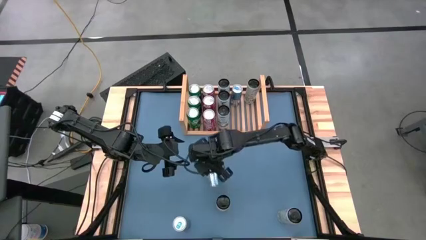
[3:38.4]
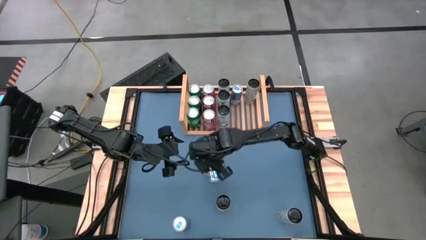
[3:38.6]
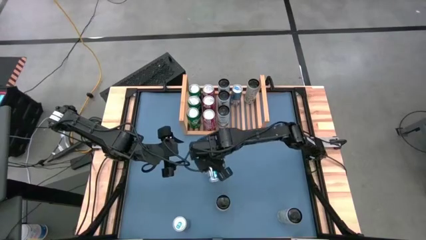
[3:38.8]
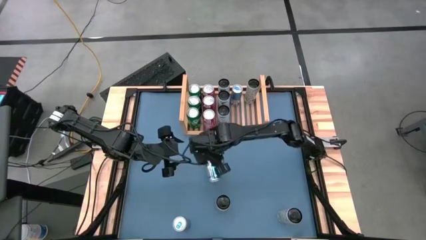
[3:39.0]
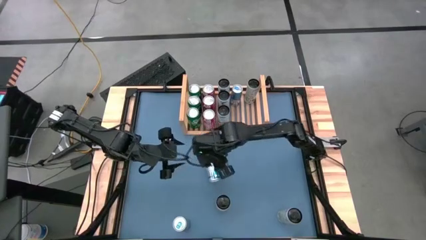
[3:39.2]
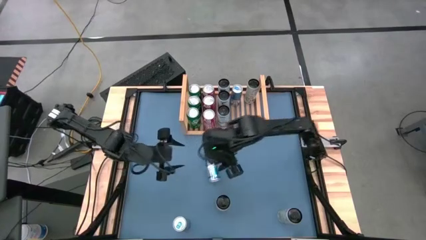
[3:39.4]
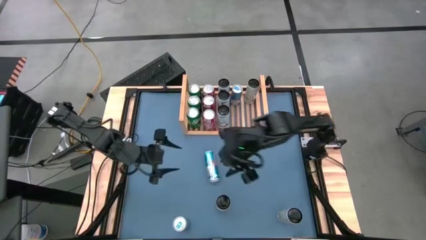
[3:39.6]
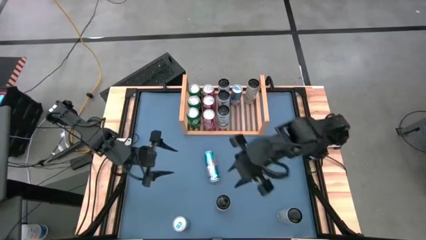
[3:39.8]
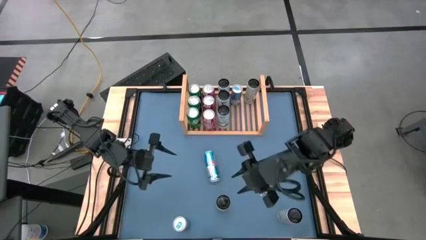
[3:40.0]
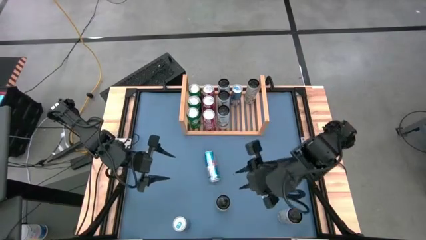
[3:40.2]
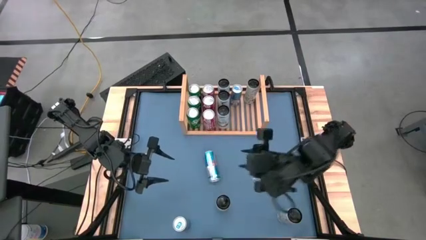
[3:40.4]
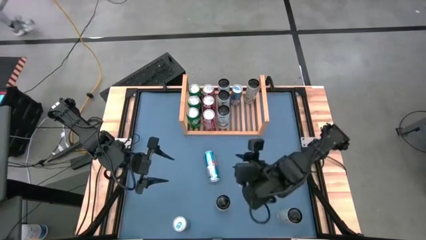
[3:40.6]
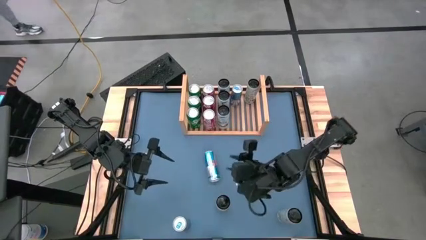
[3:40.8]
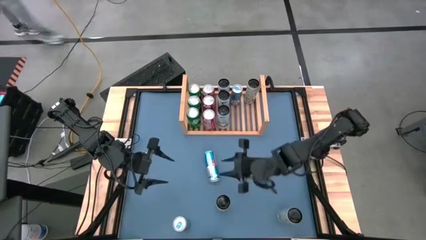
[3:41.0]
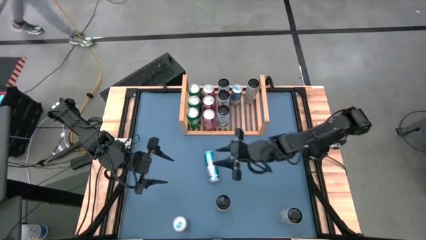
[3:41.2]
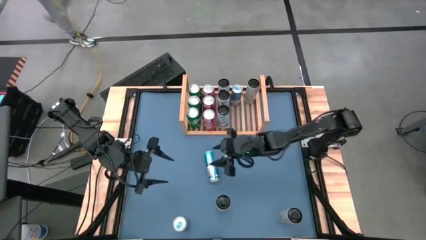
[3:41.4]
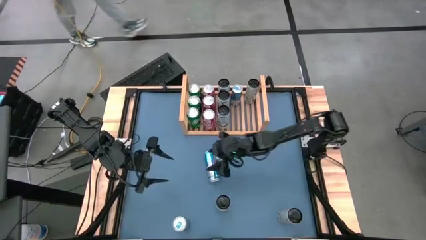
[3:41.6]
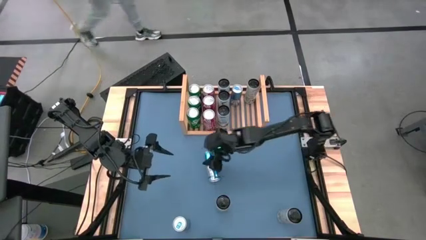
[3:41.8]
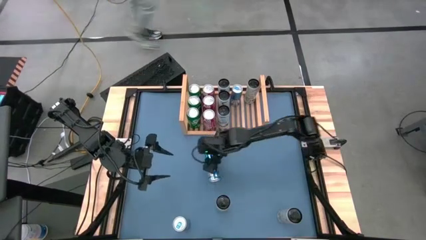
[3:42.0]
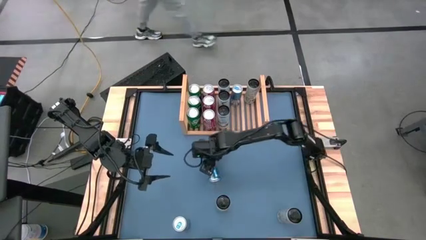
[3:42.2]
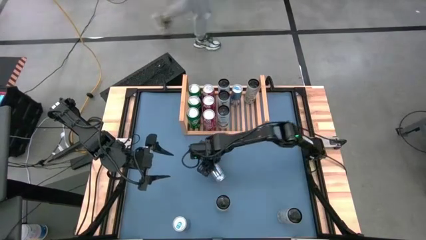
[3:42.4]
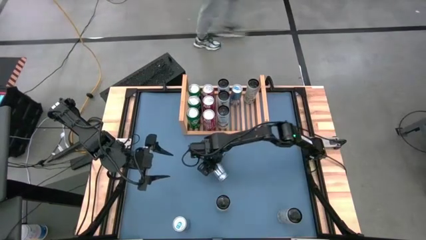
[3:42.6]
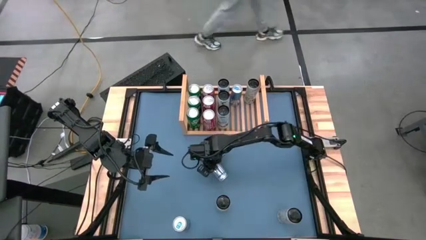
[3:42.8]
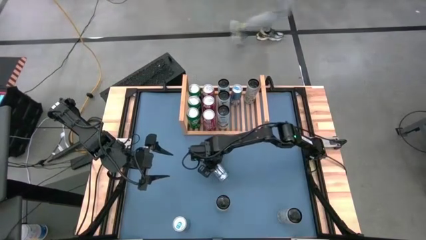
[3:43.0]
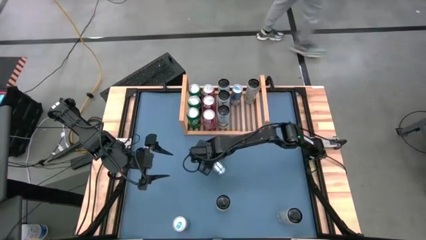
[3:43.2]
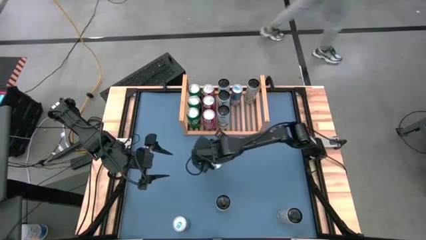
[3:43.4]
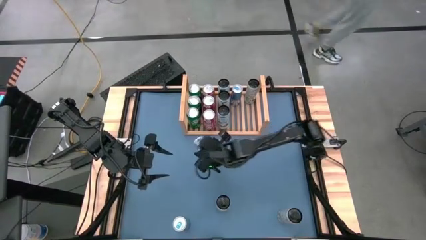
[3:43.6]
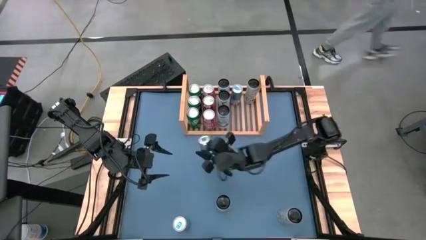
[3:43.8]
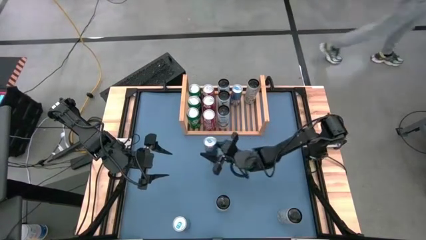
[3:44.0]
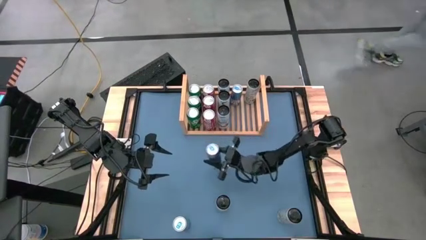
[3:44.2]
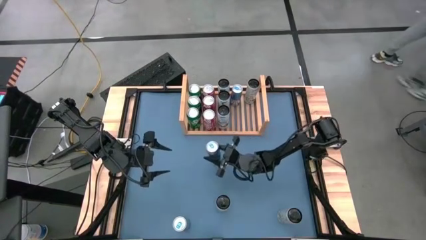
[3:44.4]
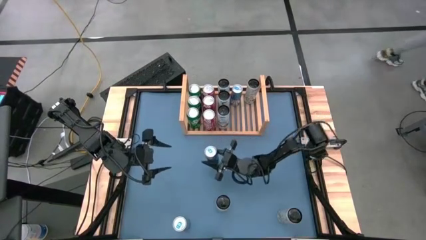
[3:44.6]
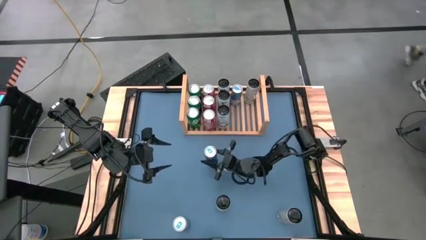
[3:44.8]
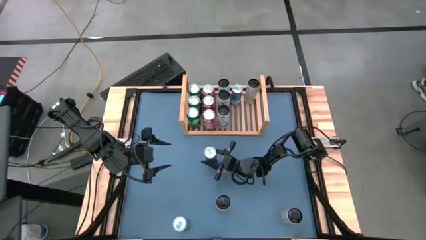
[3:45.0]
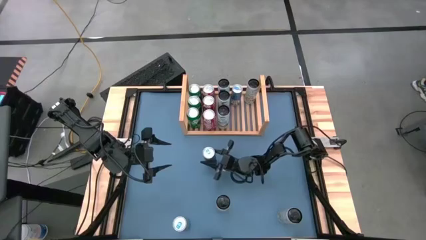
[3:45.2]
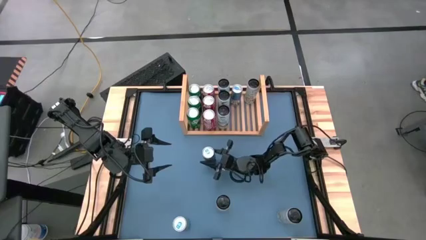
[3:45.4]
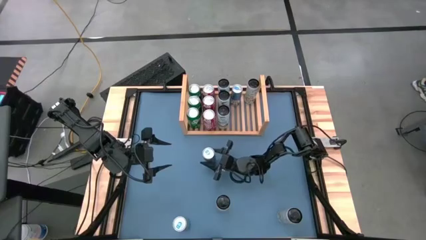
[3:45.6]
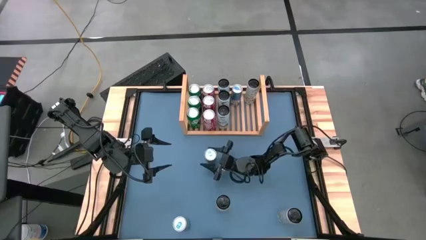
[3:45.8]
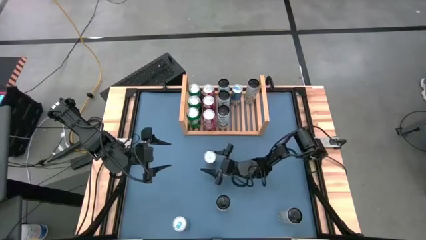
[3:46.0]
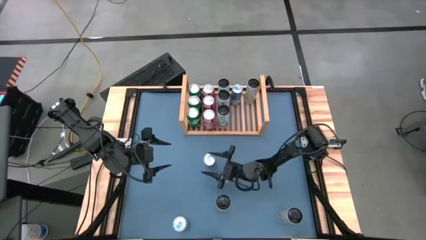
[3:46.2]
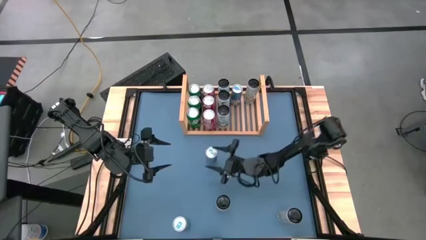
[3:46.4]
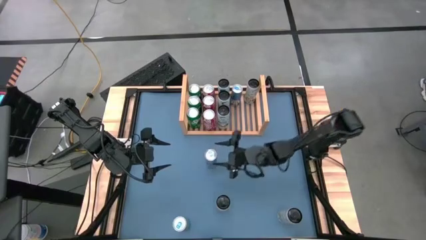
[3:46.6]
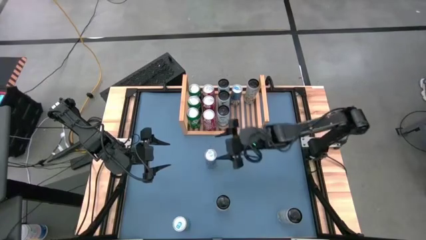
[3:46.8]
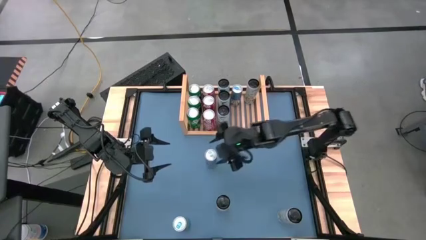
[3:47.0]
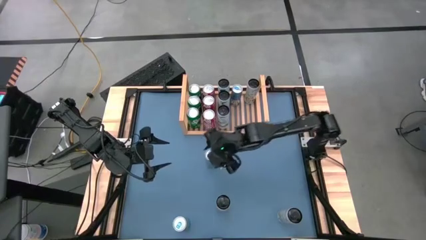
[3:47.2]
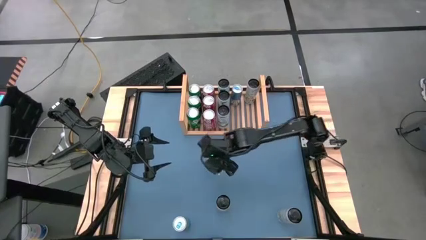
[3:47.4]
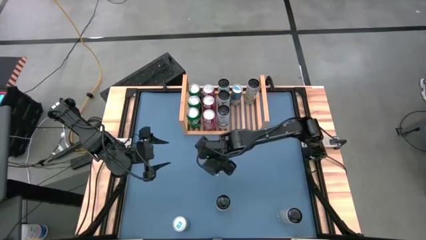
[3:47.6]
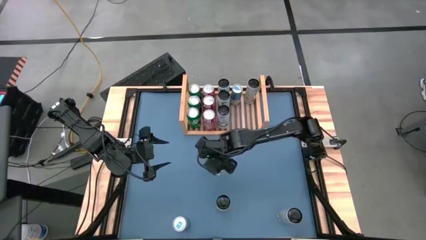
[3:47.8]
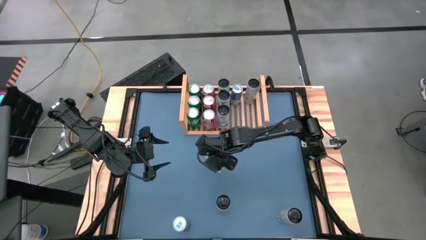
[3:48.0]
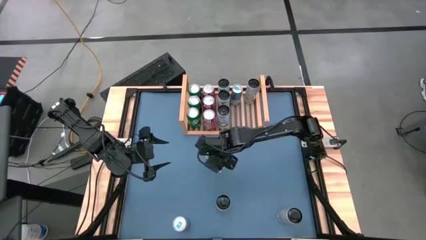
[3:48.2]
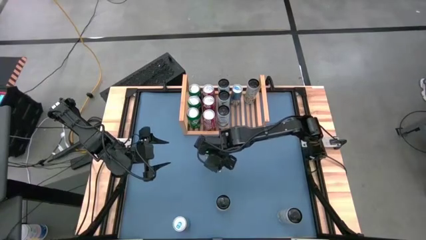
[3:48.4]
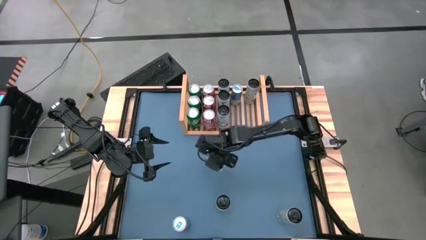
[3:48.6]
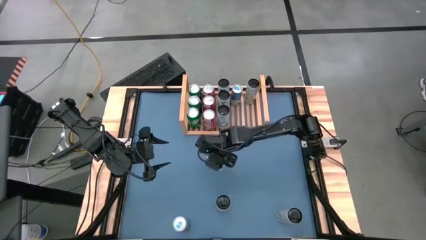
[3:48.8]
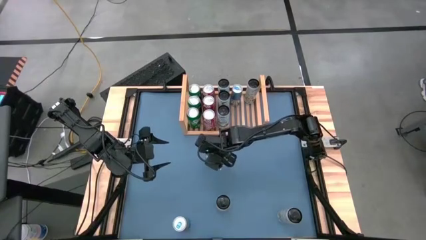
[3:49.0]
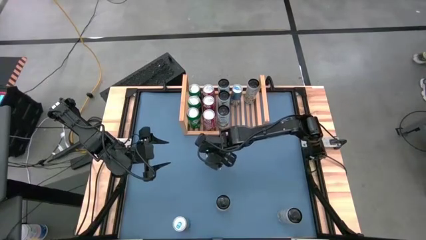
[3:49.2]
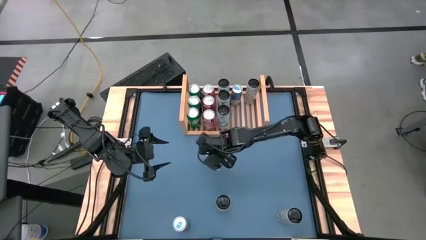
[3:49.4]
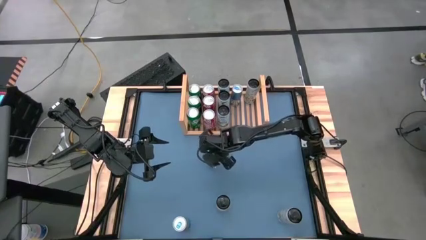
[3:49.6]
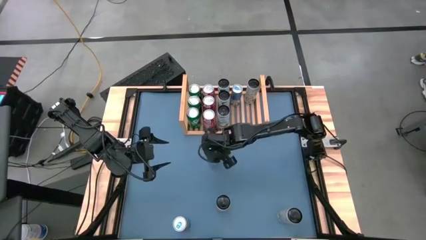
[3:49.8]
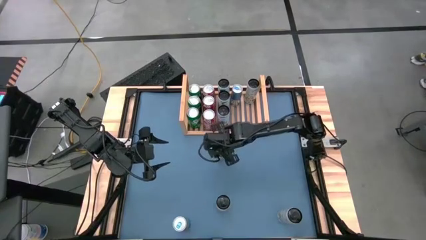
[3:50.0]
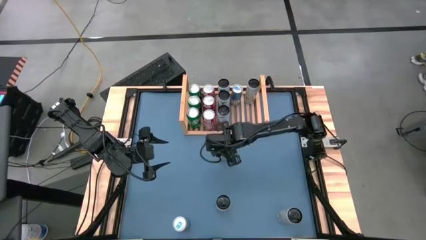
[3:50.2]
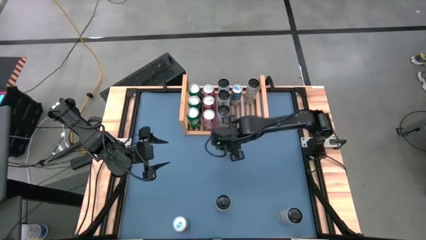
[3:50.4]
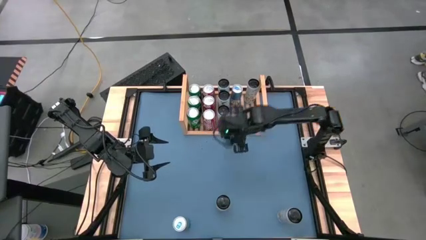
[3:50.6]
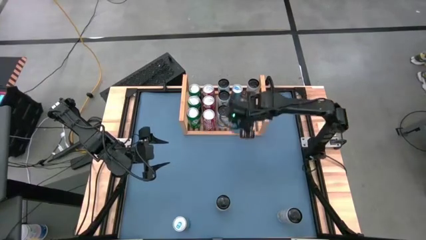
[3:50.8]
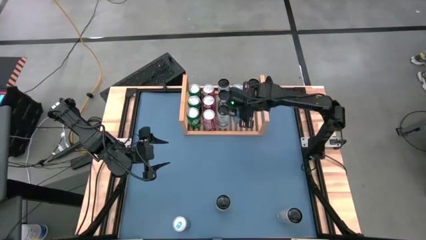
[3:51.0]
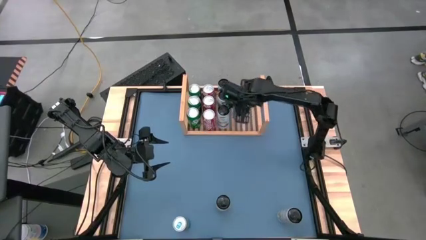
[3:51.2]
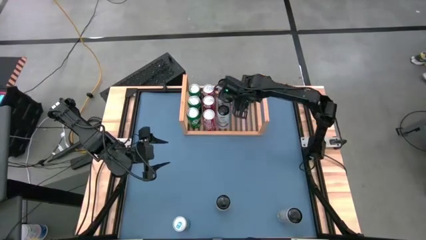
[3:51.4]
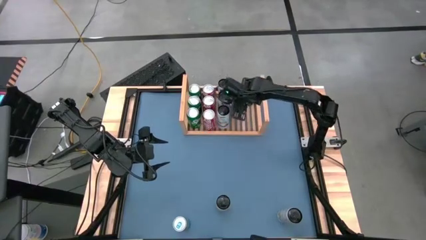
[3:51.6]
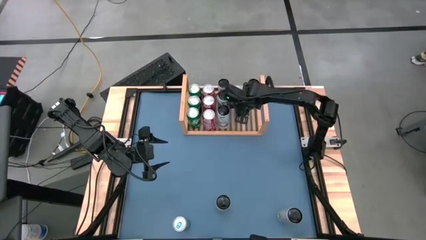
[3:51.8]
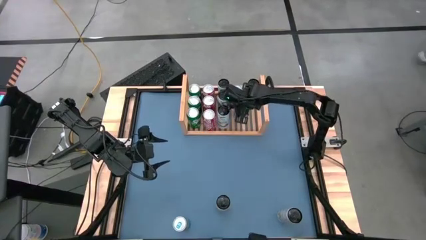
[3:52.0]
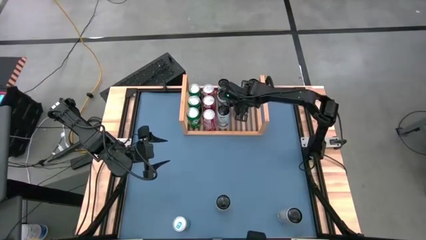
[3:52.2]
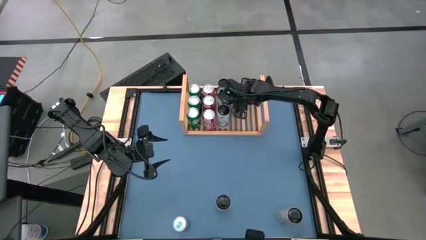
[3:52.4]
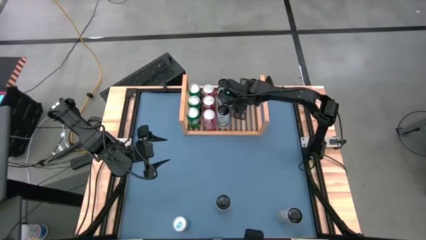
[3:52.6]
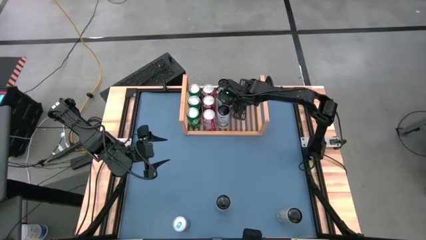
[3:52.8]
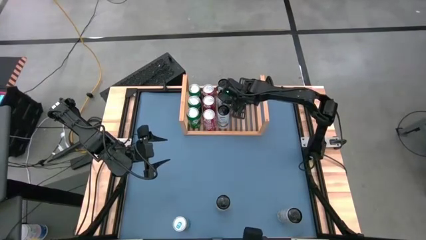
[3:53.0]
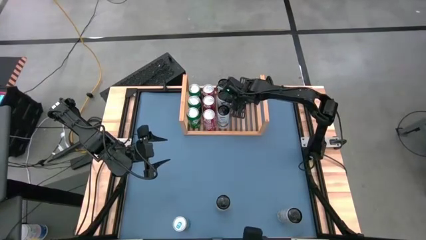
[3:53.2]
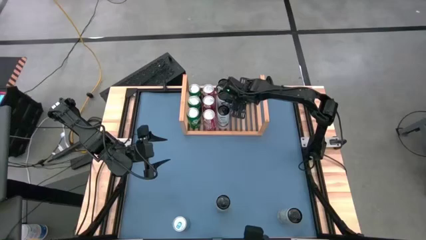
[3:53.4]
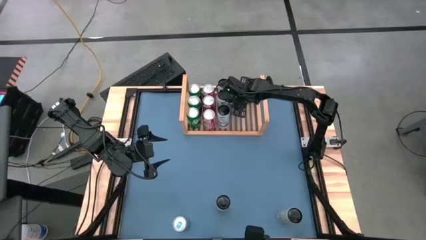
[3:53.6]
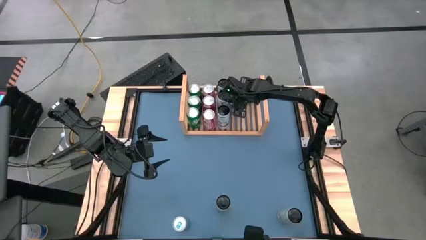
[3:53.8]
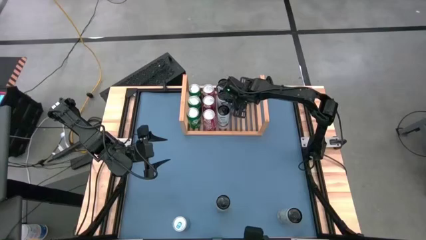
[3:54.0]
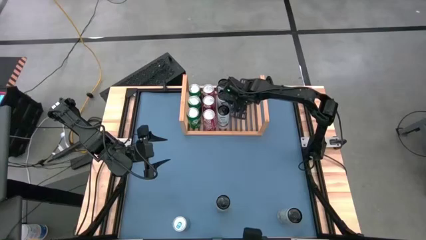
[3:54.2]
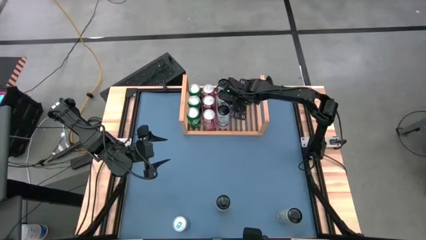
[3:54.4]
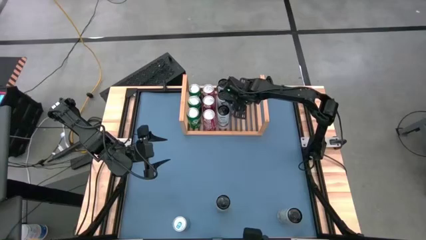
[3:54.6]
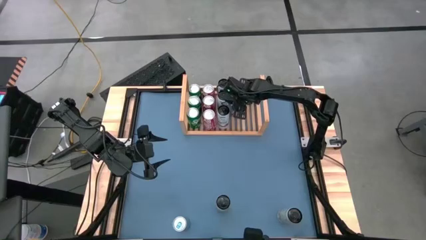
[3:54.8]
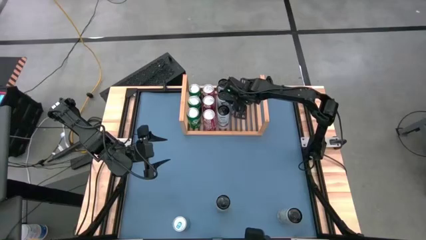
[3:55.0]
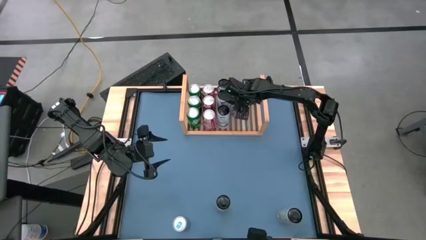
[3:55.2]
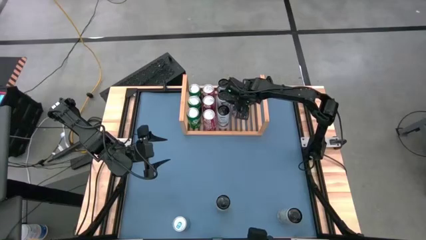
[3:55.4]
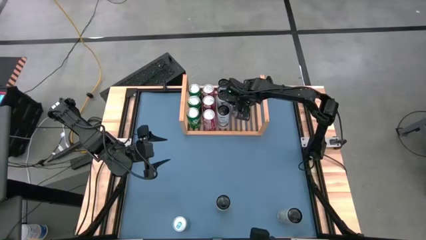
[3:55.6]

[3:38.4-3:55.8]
Task: Place canned beverage on shelf
Put the middle blue soda can aligned with the blue soda on the shelf
